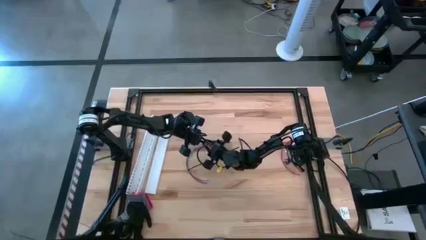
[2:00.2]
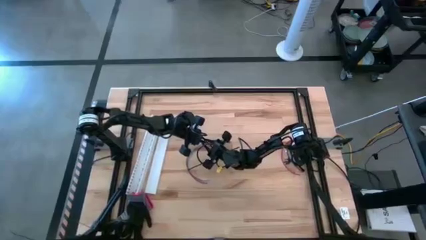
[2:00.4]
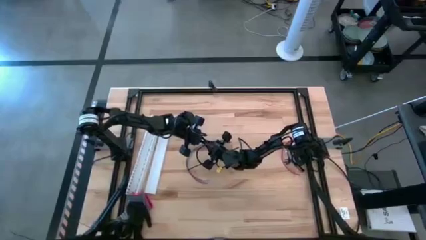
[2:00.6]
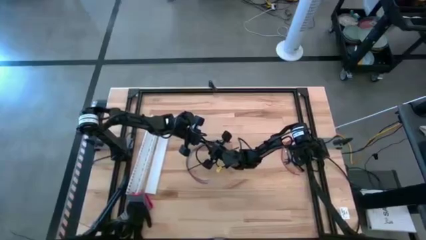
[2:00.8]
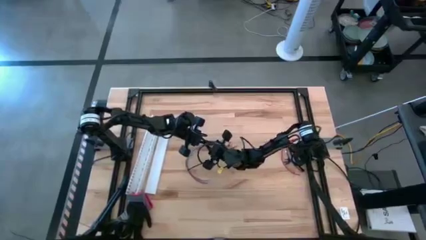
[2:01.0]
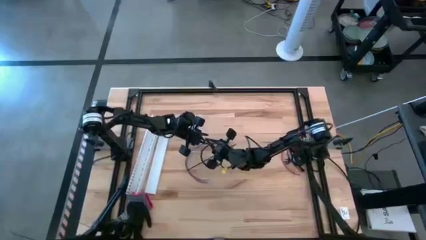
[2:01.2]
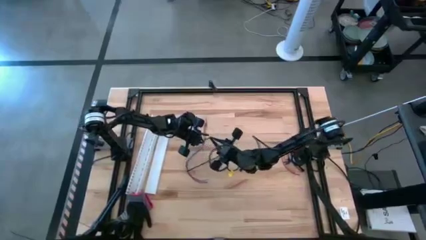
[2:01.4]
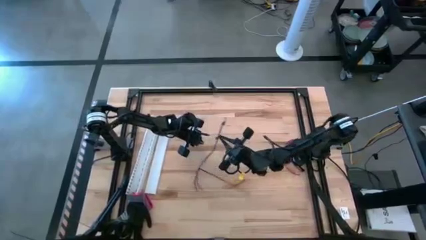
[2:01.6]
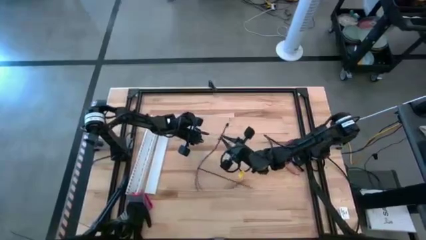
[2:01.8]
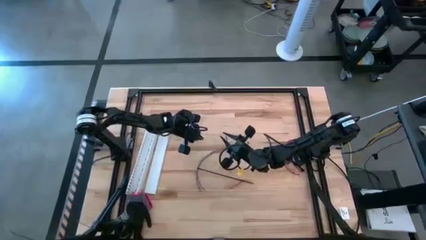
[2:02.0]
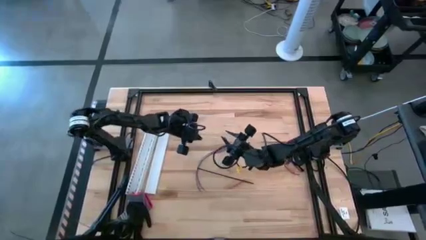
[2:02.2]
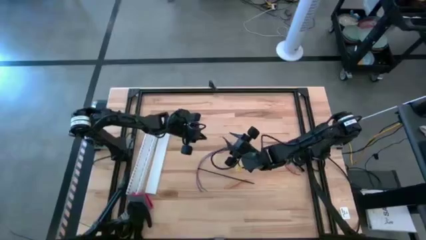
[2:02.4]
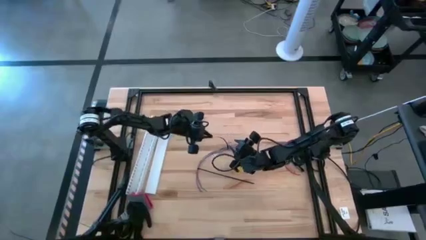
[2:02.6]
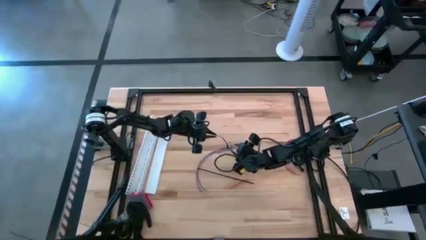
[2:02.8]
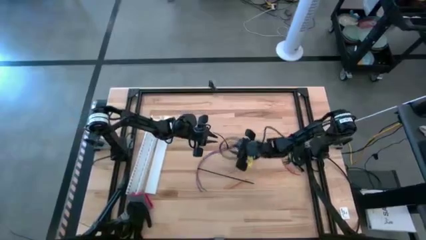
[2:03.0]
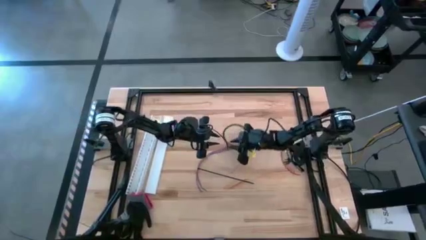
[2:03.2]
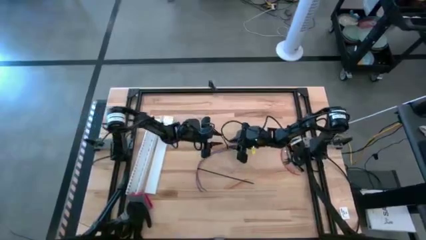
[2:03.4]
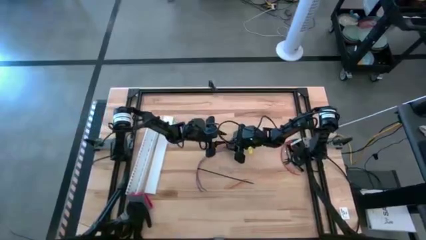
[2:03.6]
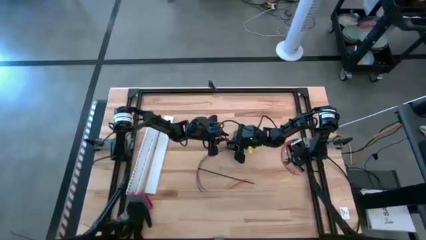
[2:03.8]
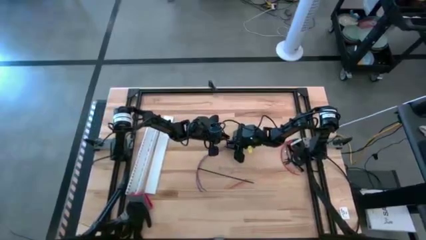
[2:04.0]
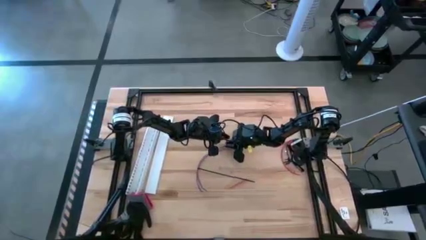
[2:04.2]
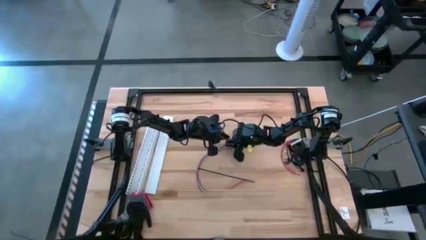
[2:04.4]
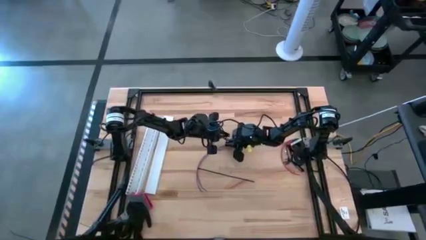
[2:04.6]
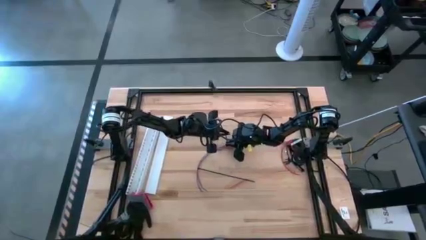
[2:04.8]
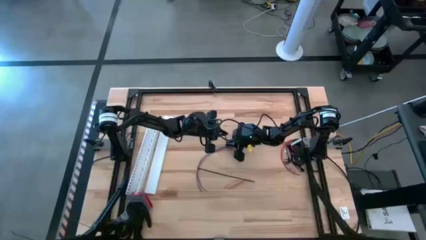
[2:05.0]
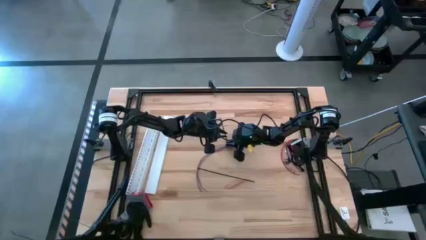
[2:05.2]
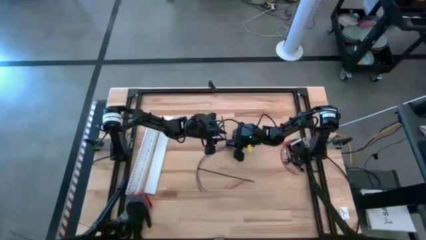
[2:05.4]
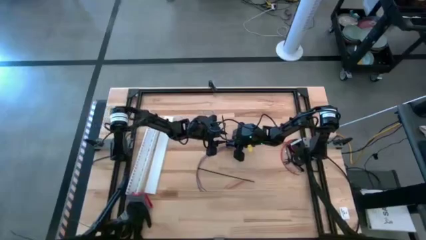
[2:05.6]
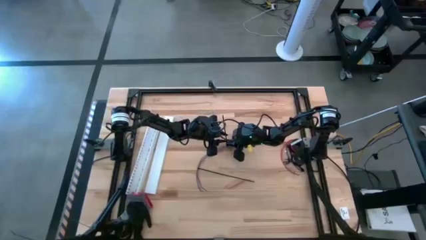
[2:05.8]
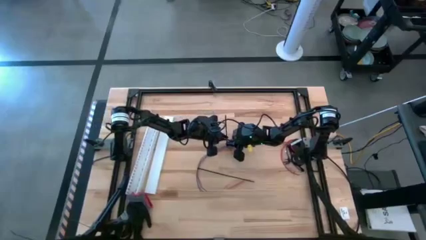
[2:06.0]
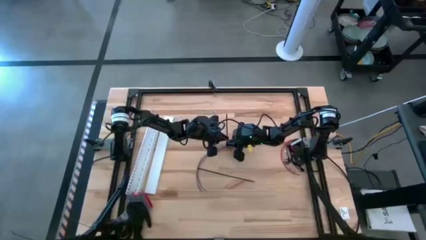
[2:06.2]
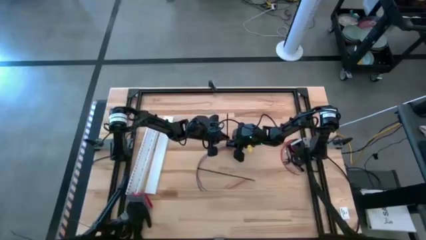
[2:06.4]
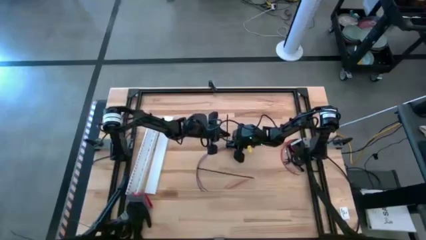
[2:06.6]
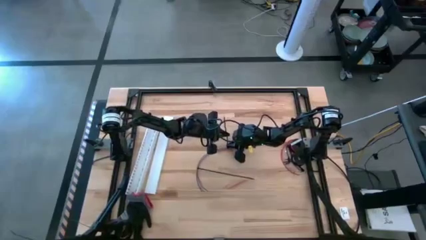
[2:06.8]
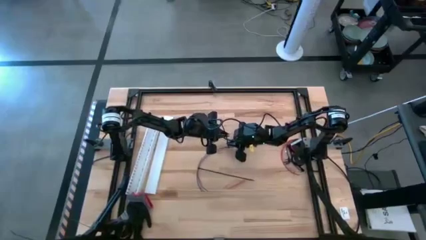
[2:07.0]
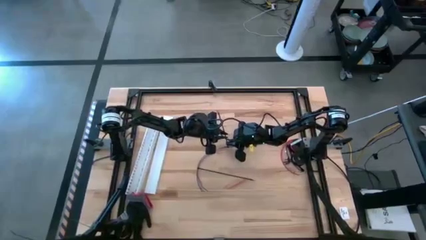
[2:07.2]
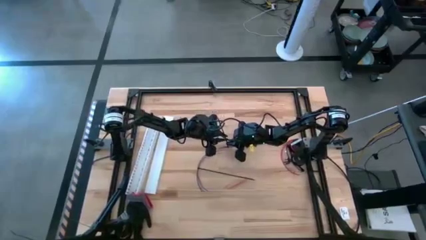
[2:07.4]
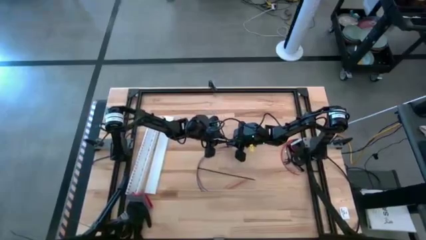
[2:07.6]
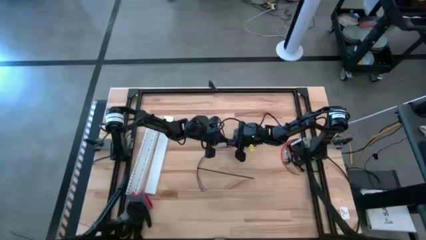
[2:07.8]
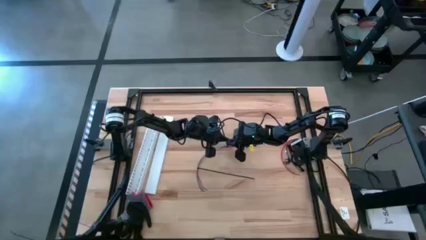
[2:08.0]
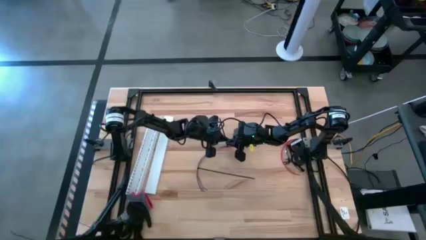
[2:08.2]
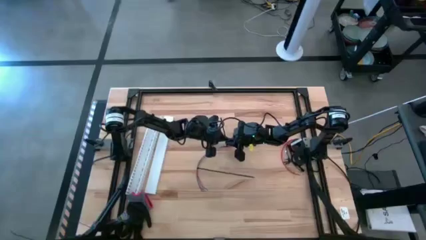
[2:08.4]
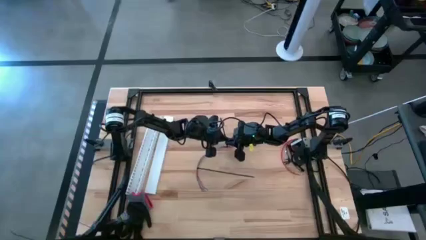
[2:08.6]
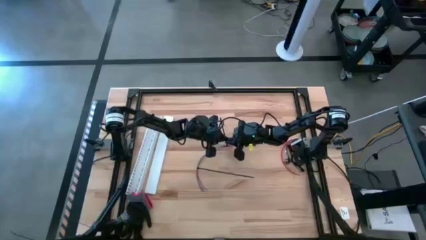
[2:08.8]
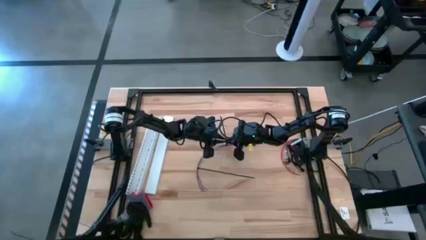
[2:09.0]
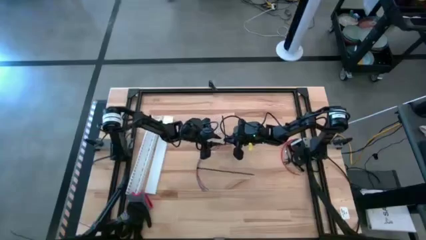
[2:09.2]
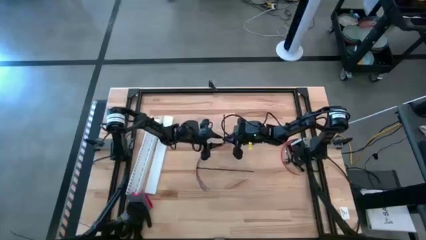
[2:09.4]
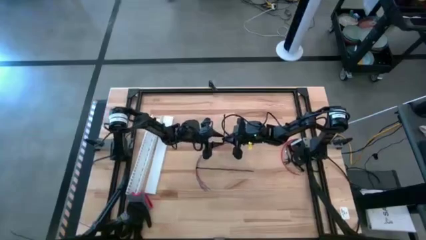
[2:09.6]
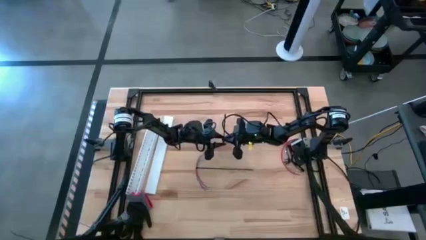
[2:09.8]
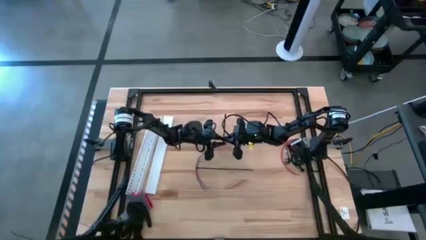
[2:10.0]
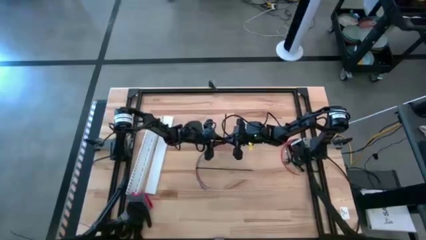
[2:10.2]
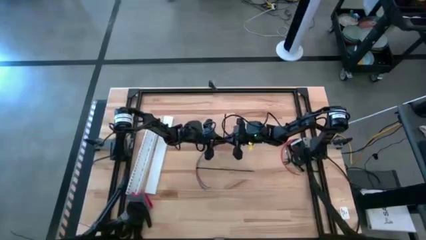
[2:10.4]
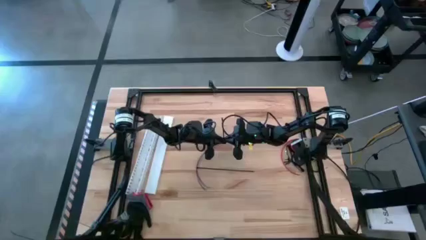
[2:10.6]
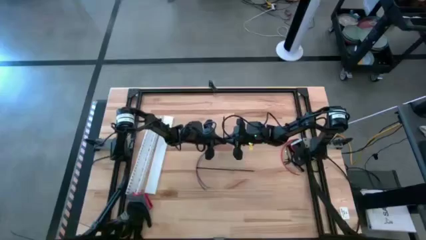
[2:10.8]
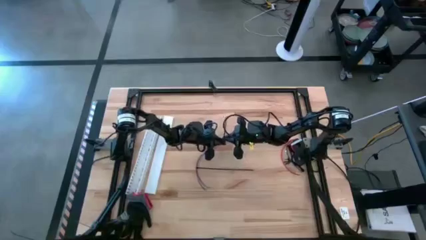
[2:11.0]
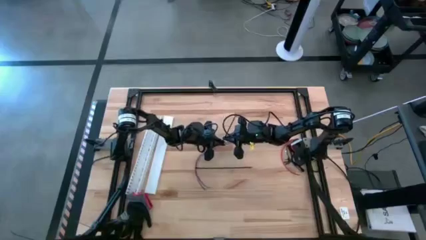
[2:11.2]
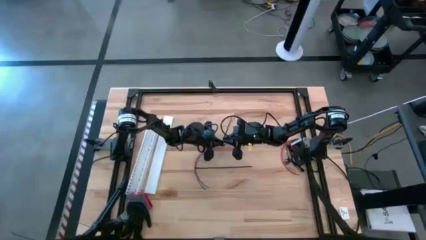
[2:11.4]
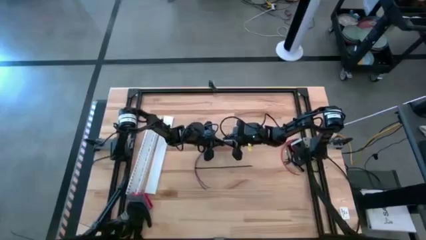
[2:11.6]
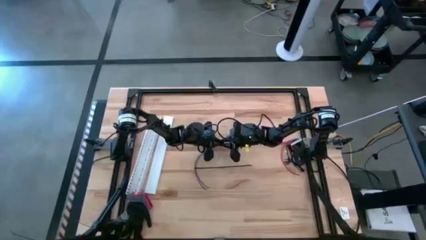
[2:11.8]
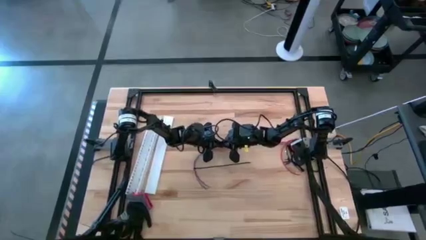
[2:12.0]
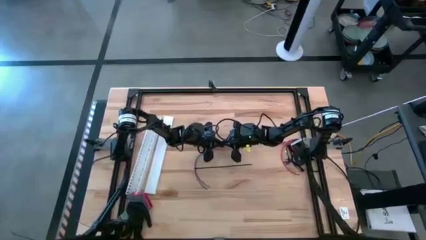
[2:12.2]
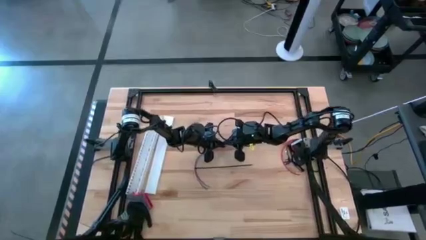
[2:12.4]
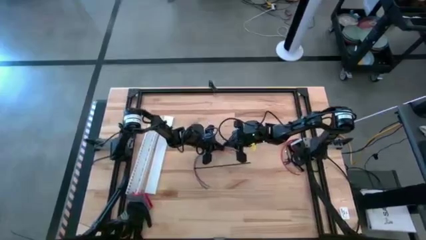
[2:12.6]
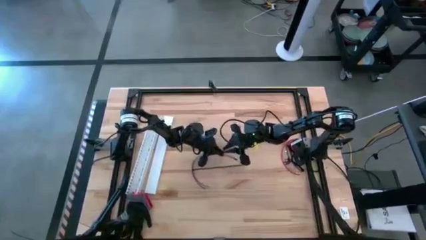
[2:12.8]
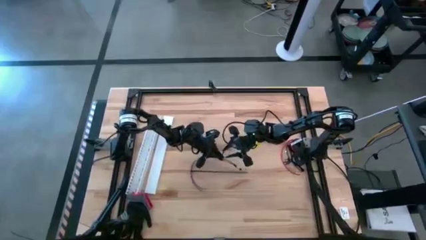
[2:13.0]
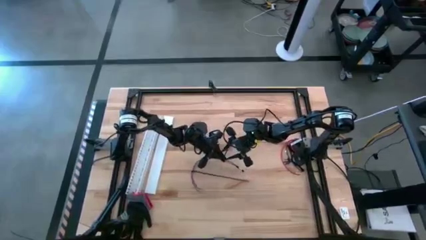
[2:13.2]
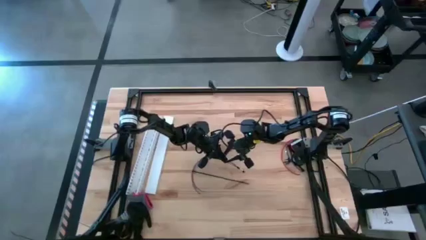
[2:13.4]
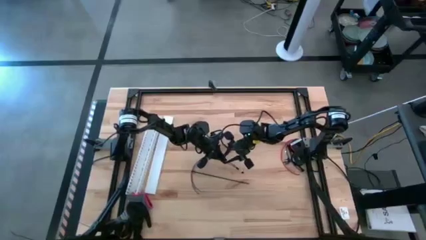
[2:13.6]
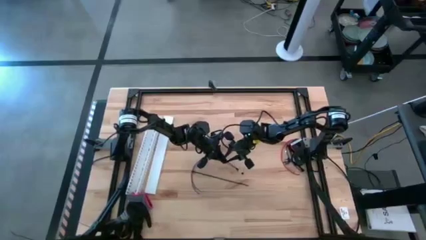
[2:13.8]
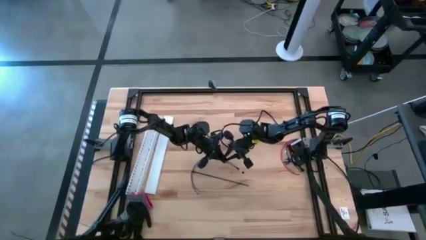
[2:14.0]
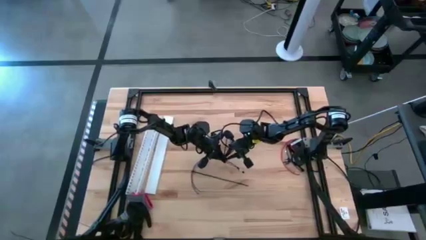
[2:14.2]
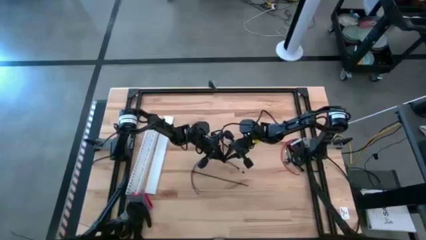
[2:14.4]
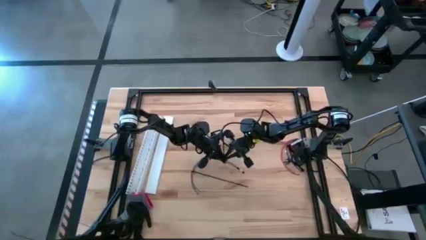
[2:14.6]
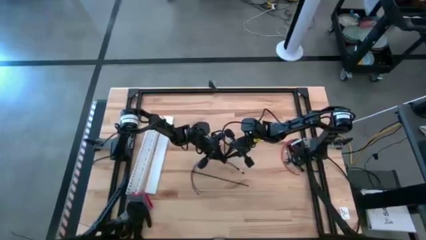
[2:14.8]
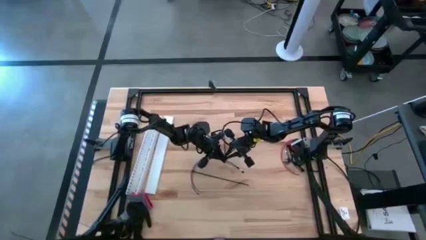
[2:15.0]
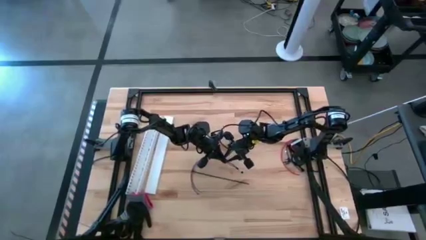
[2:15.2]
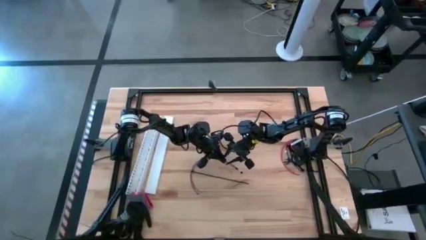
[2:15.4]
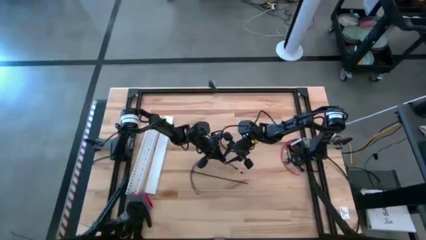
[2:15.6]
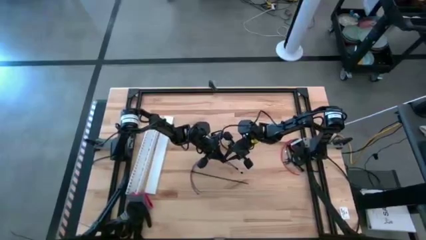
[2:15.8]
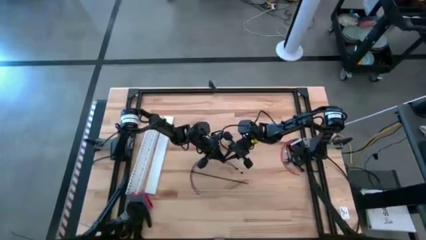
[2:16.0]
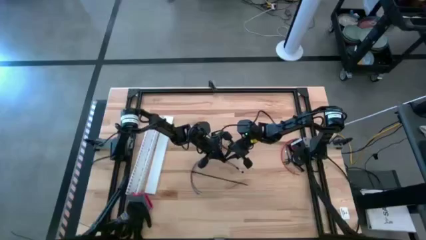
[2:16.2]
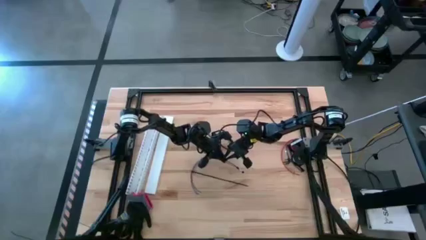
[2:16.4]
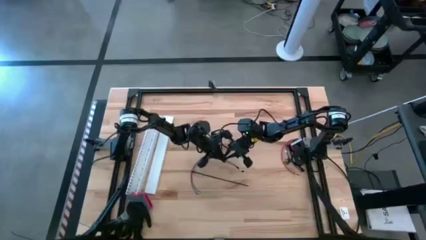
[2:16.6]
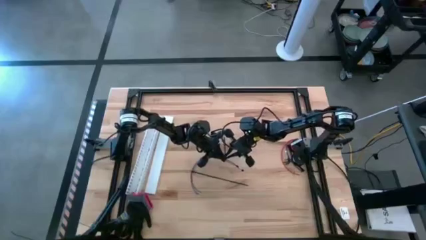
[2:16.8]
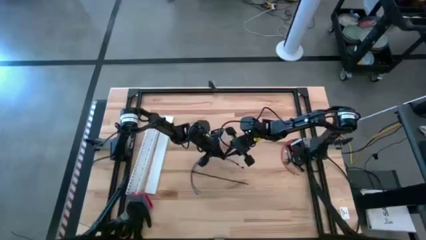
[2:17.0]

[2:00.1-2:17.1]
Task: Ziptie cables
Wrap the cable wires using black ziptie
